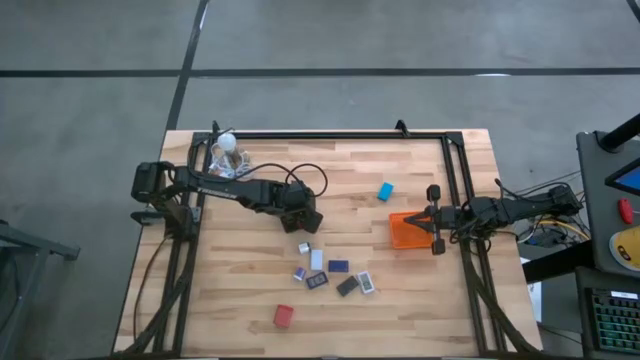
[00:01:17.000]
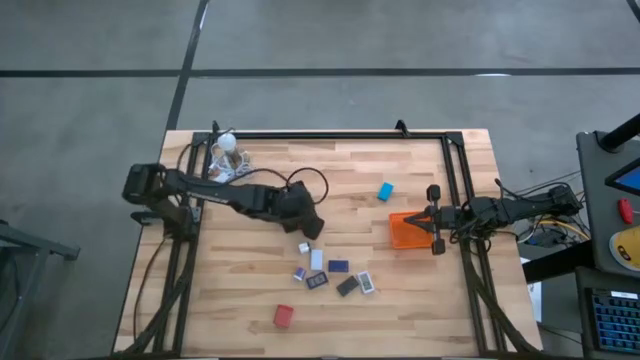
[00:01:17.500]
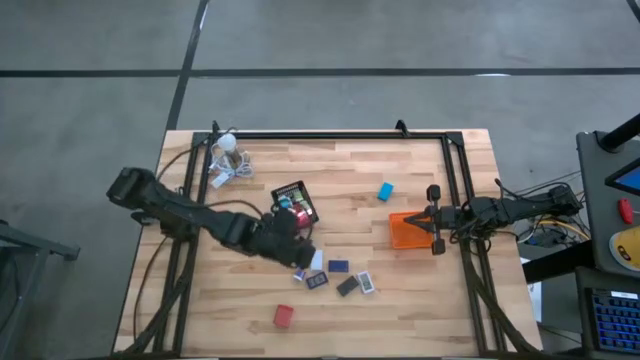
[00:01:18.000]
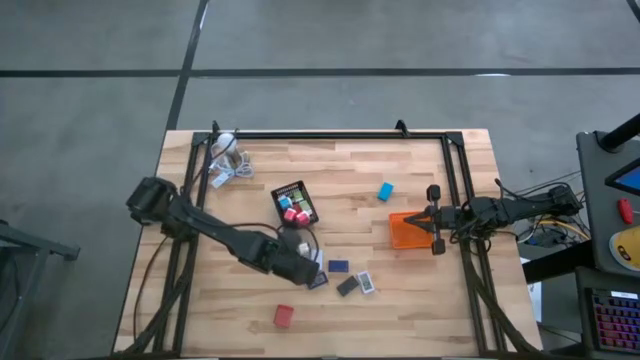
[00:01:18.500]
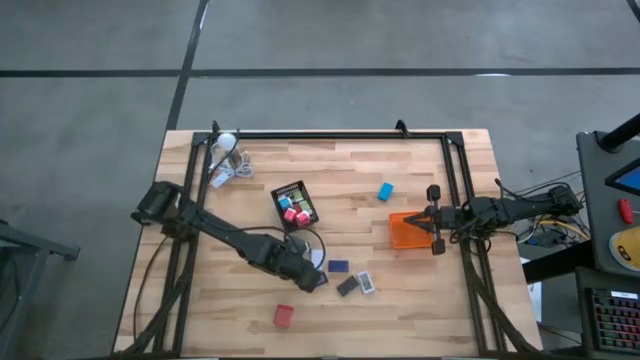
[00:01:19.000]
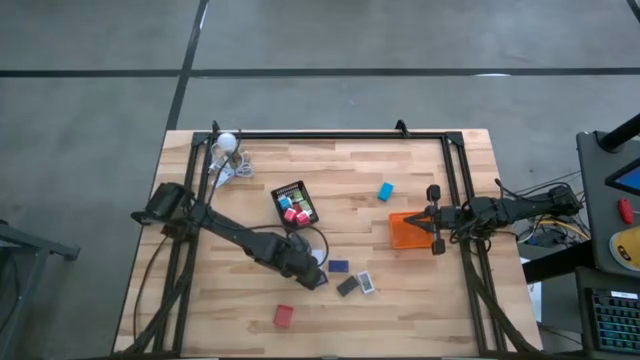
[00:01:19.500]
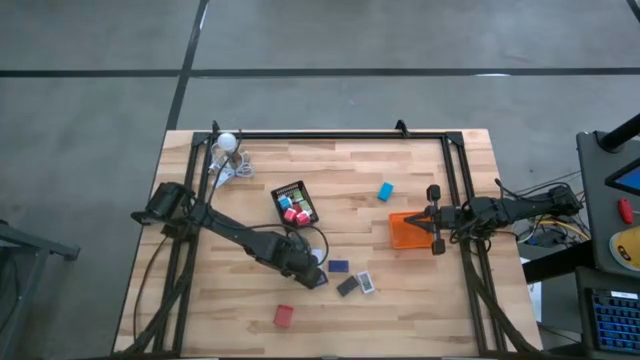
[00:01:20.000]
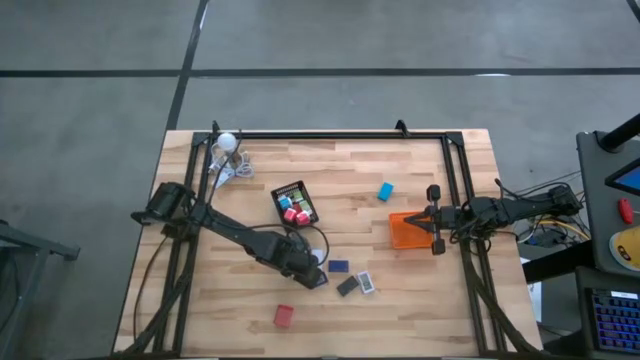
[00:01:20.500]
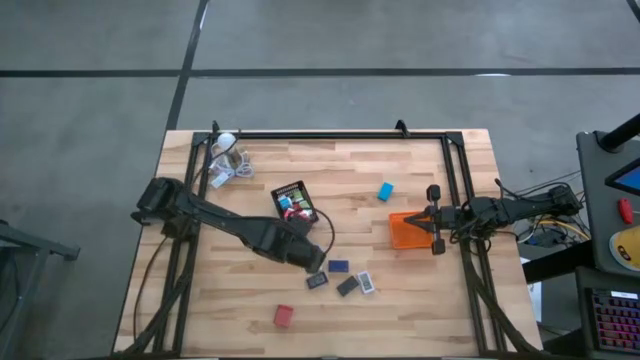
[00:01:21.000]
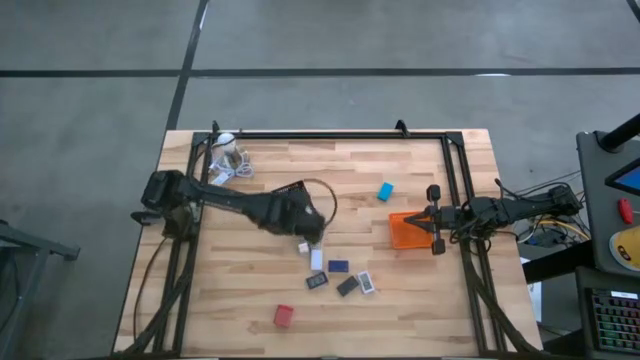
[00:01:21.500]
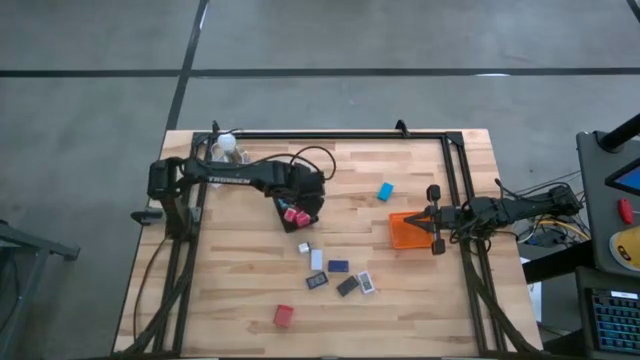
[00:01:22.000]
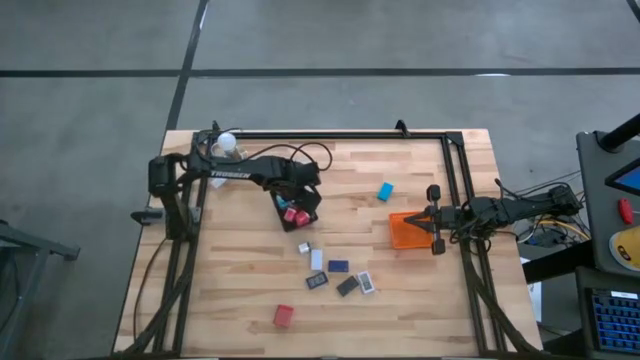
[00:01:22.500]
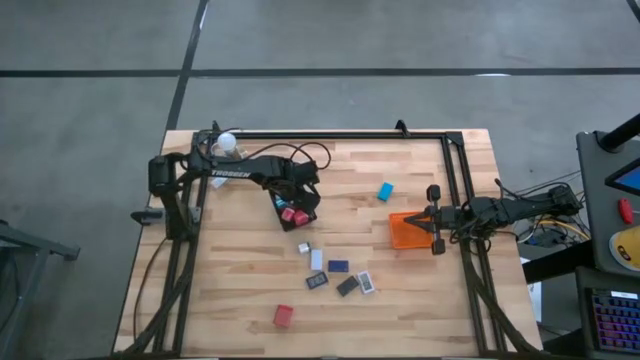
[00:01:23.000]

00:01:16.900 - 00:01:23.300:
Task: Pick & Place Office items
Put the purple charger adapter in the black bin

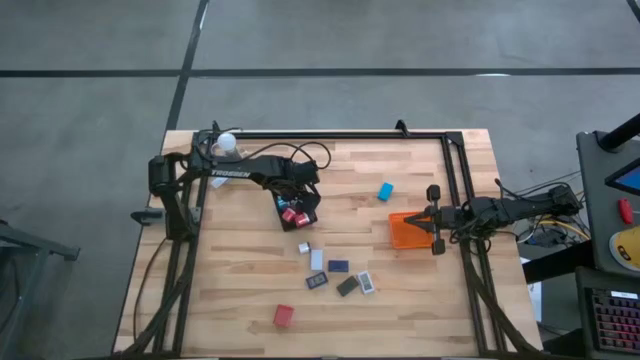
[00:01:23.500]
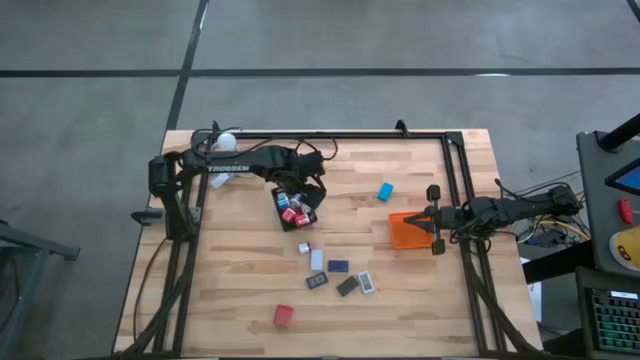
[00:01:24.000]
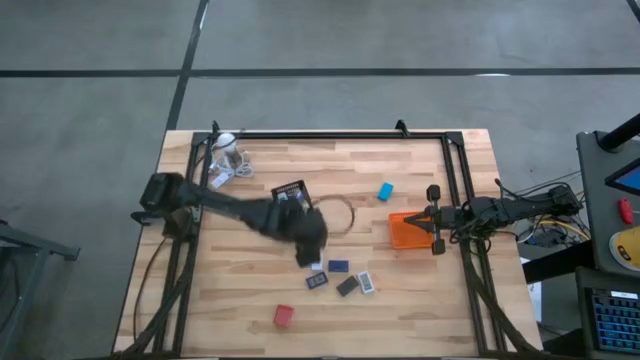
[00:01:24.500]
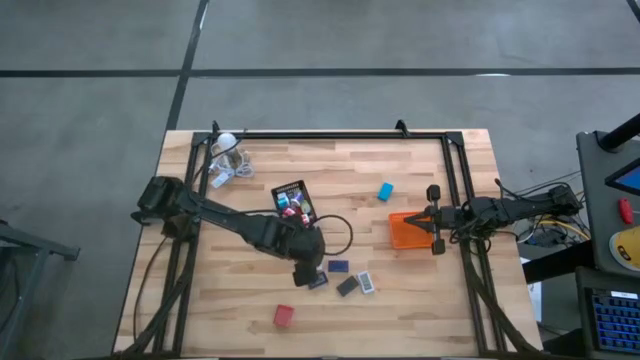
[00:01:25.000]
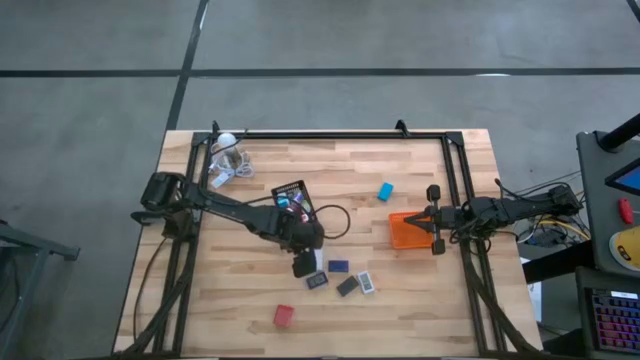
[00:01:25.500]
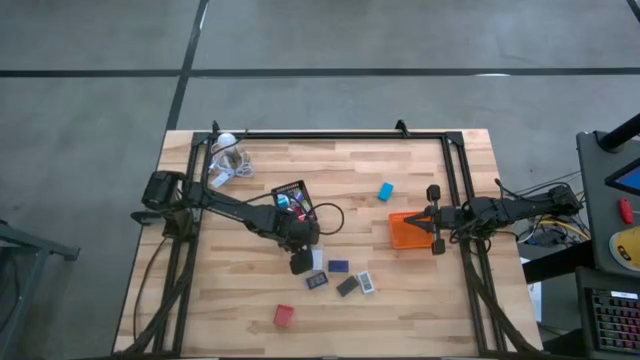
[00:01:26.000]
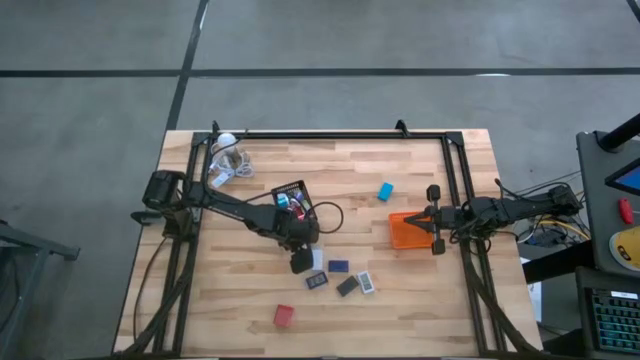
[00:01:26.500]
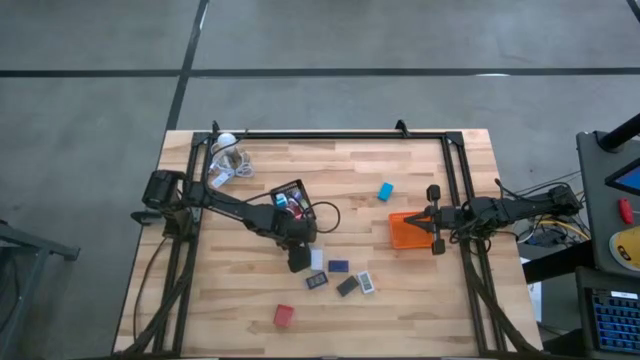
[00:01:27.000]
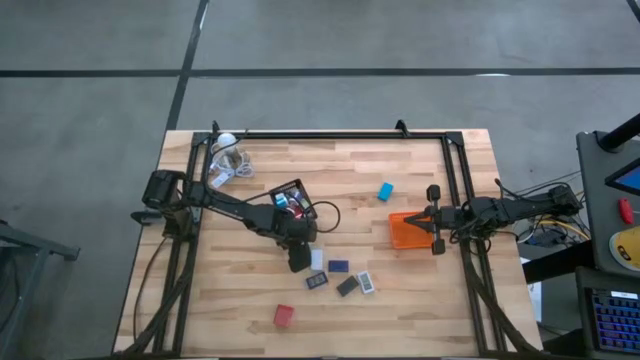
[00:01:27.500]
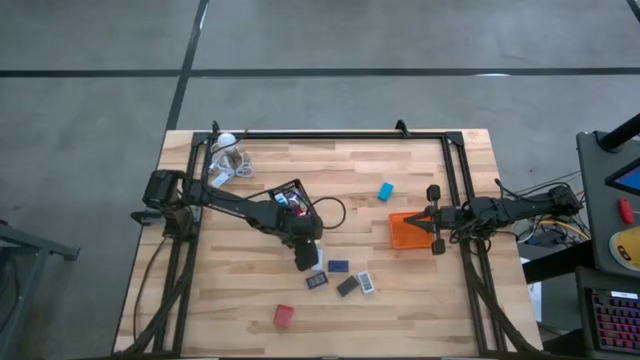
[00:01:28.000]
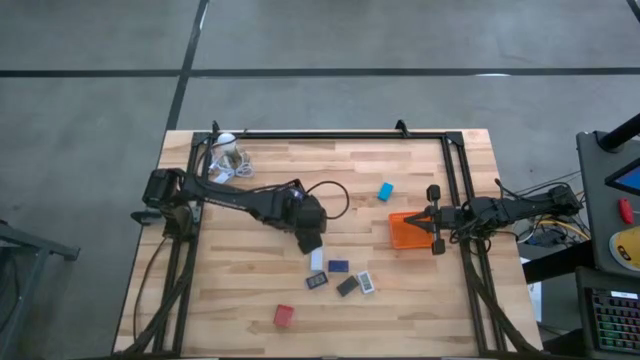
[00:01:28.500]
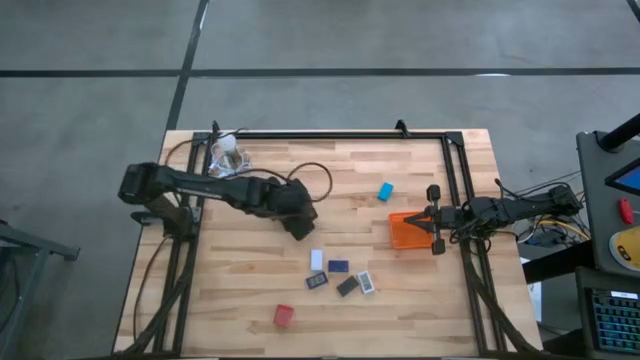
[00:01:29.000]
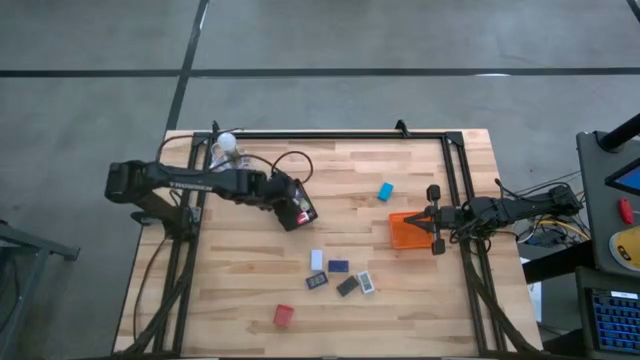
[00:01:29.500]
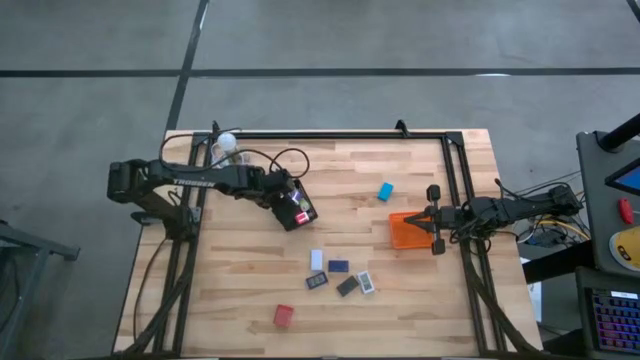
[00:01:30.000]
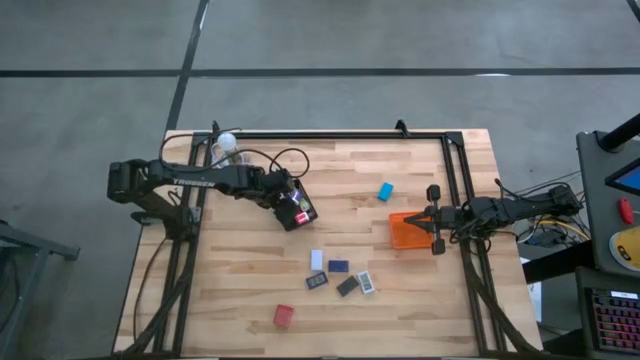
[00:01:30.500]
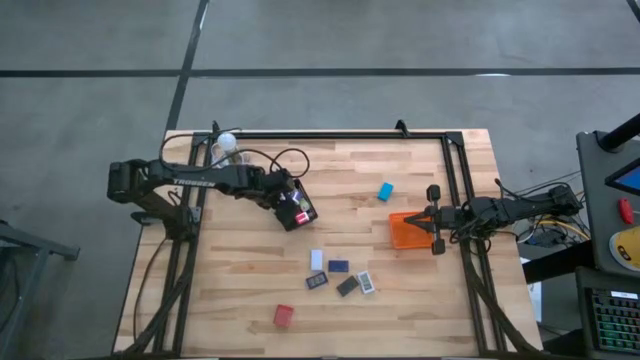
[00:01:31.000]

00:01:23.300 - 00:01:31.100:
Put the white charger adapter in the black bin

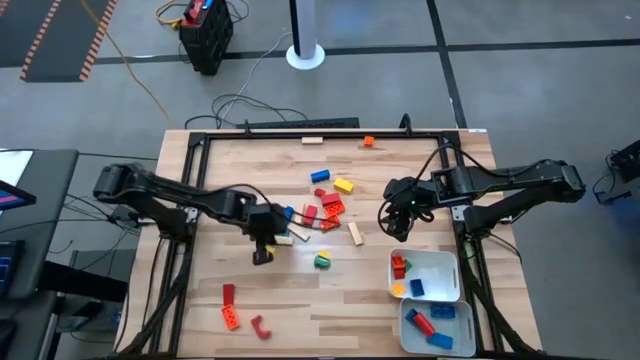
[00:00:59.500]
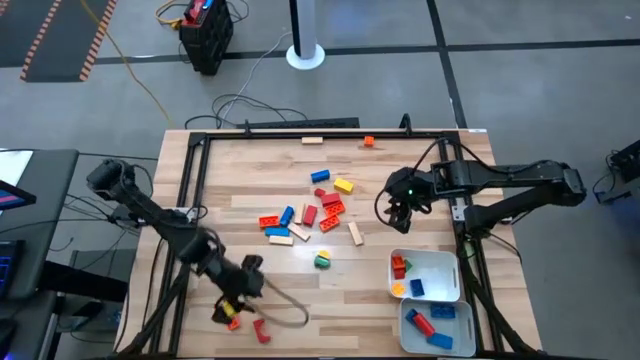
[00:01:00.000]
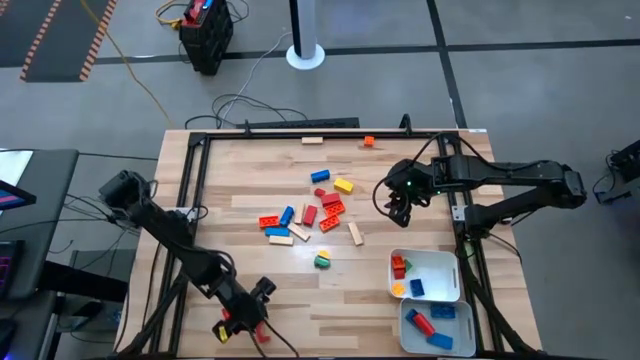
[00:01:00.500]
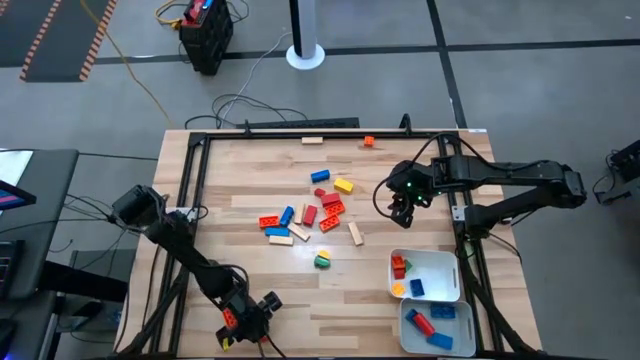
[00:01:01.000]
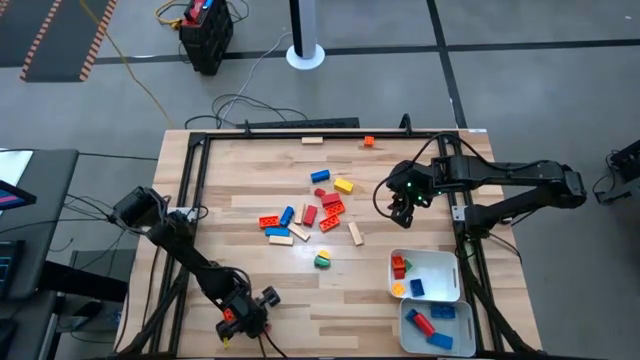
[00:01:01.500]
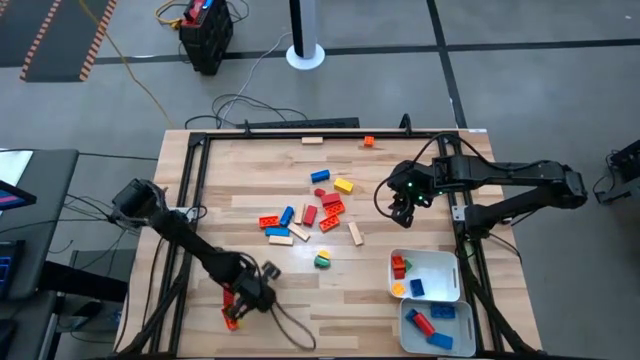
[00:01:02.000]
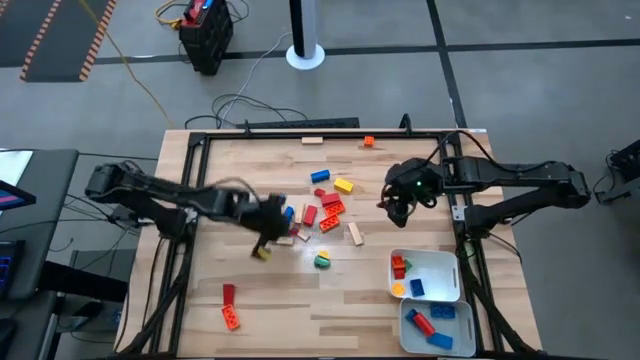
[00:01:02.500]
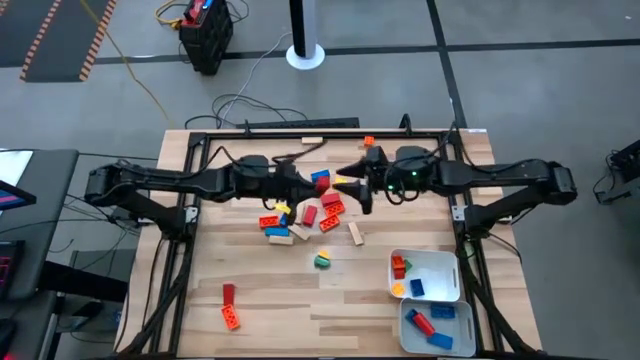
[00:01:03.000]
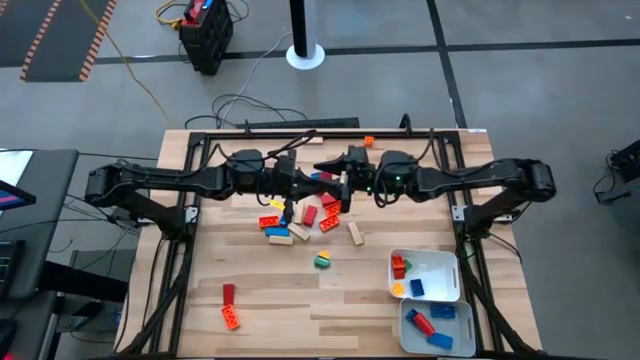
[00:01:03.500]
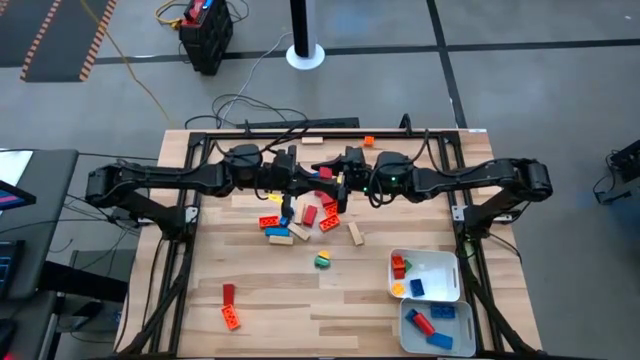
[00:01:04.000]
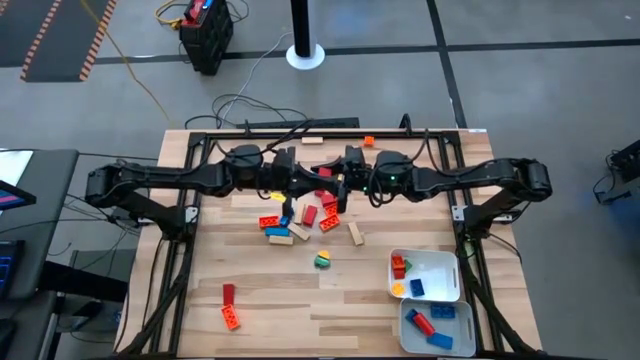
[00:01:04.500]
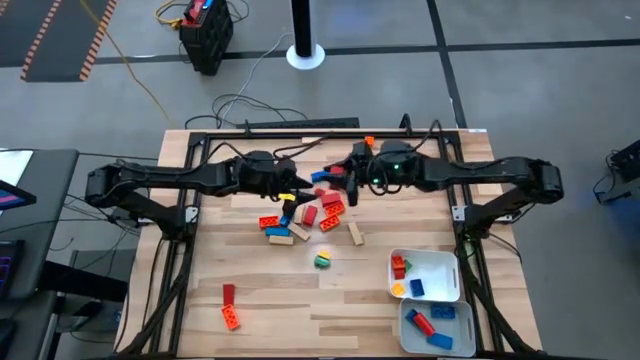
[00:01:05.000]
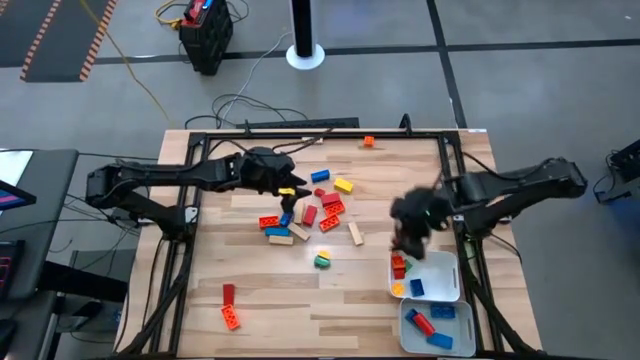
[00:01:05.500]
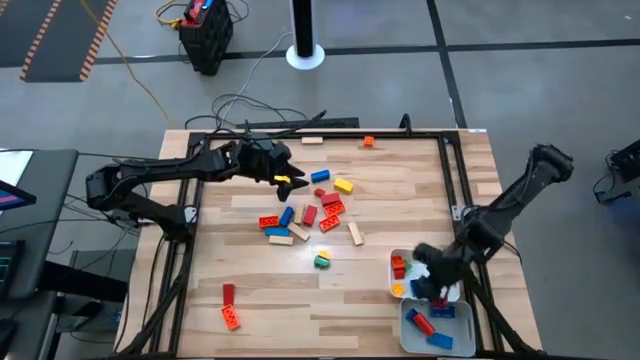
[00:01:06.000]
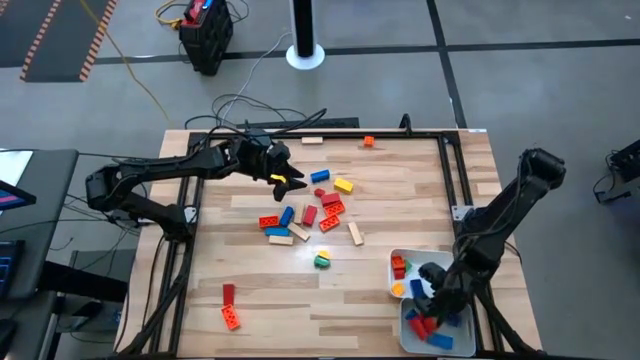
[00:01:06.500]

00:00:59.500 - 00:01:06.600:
Task: Sort blocks by size
Put the big red block into the gray bin
